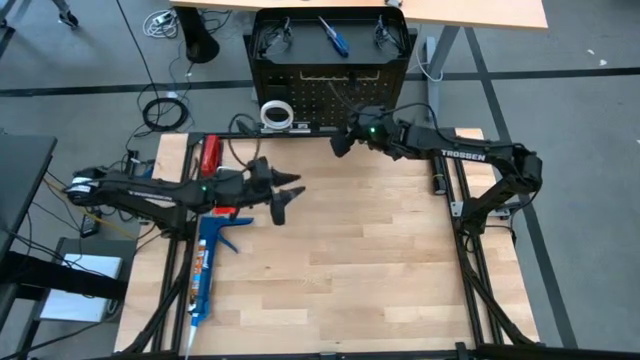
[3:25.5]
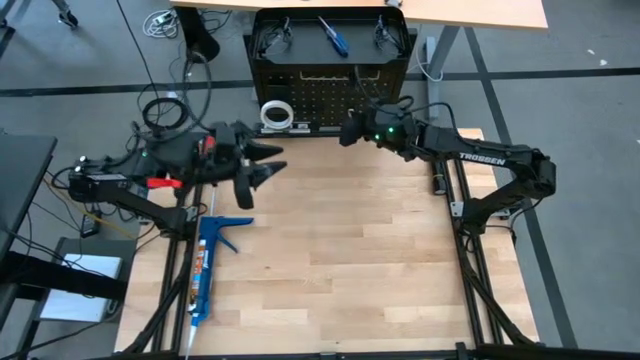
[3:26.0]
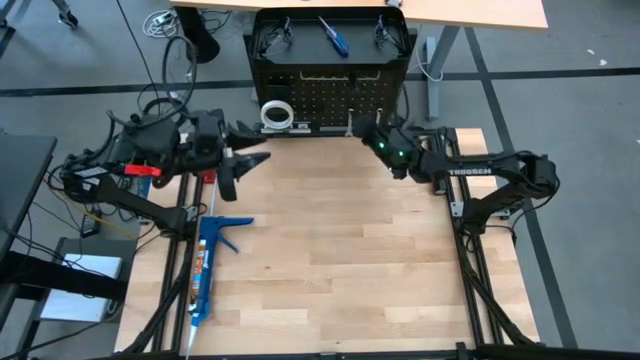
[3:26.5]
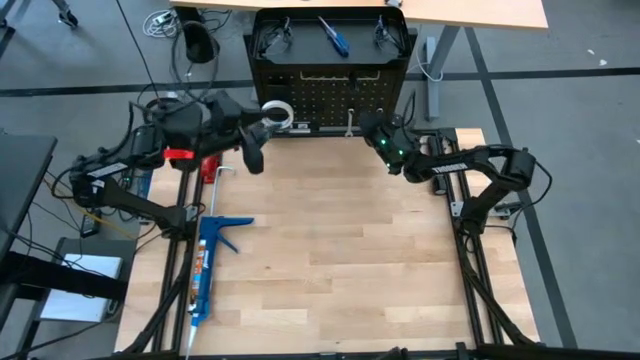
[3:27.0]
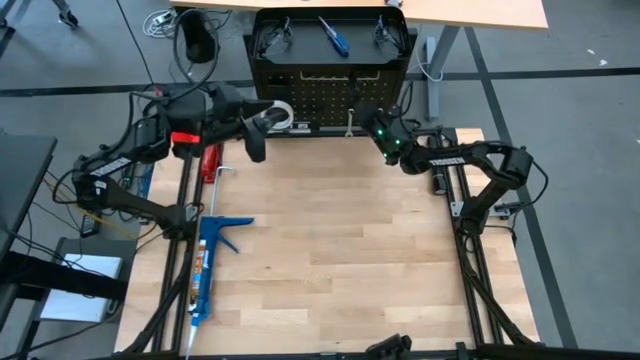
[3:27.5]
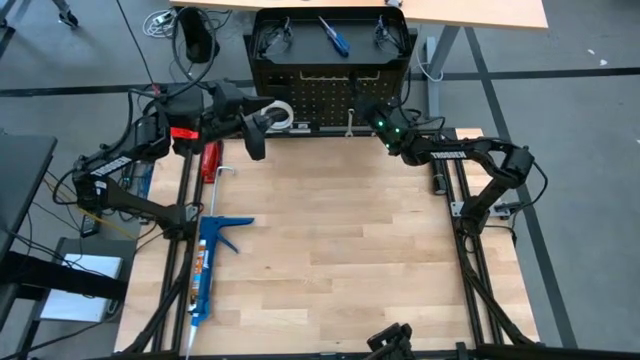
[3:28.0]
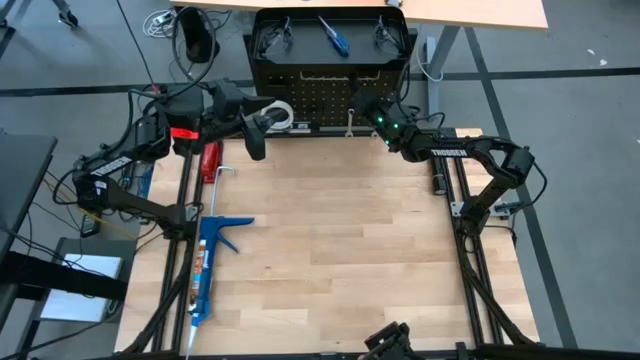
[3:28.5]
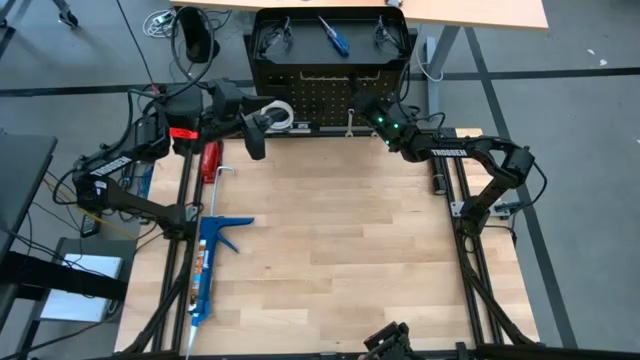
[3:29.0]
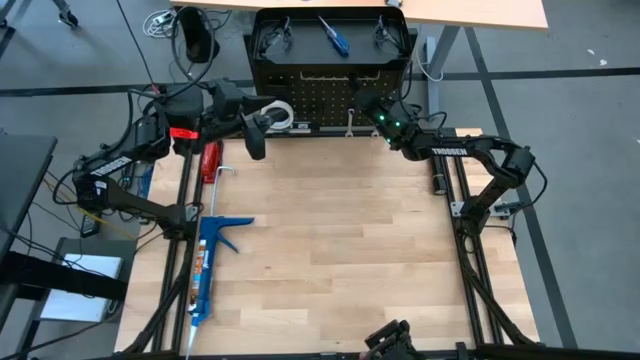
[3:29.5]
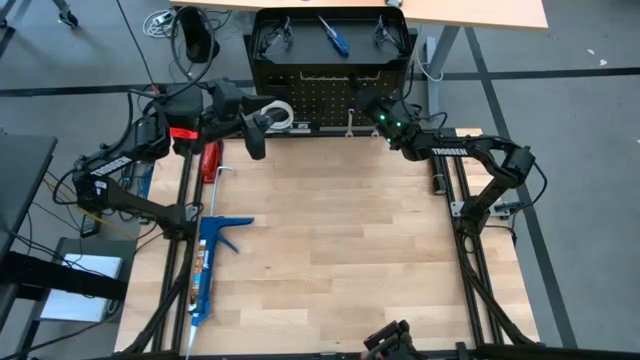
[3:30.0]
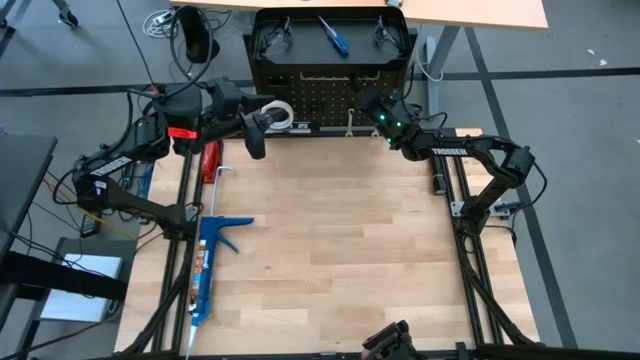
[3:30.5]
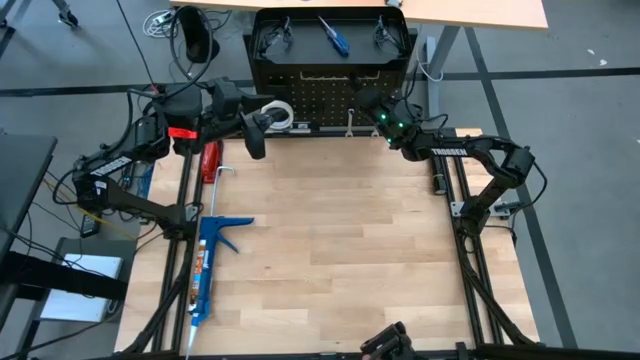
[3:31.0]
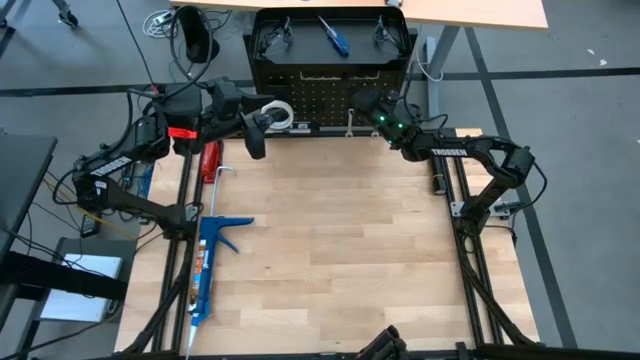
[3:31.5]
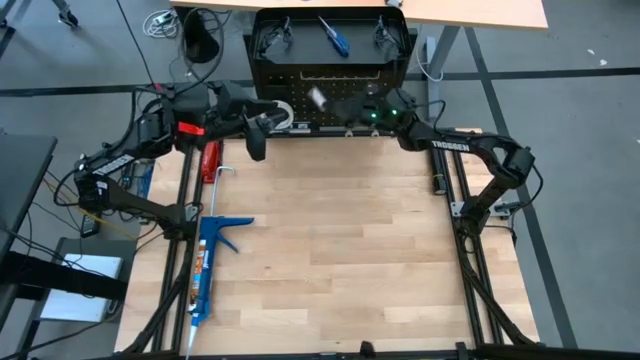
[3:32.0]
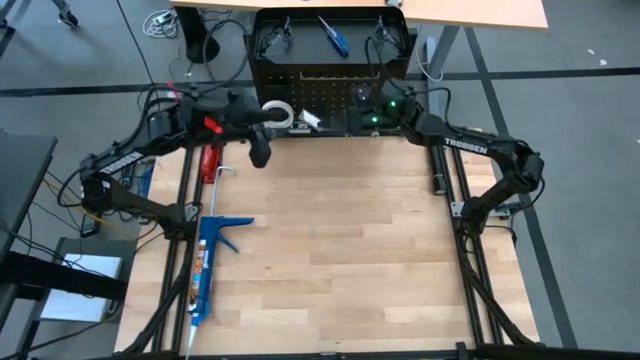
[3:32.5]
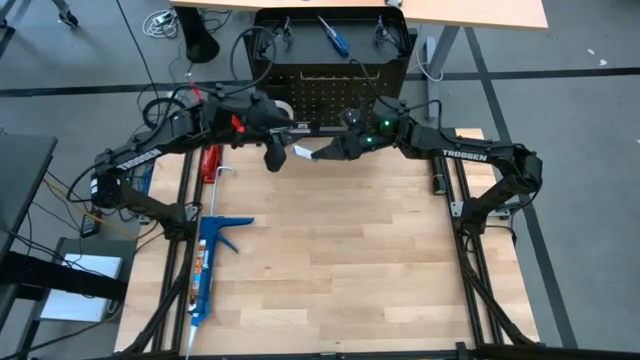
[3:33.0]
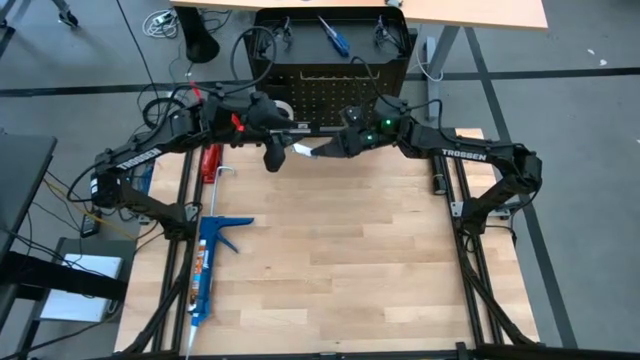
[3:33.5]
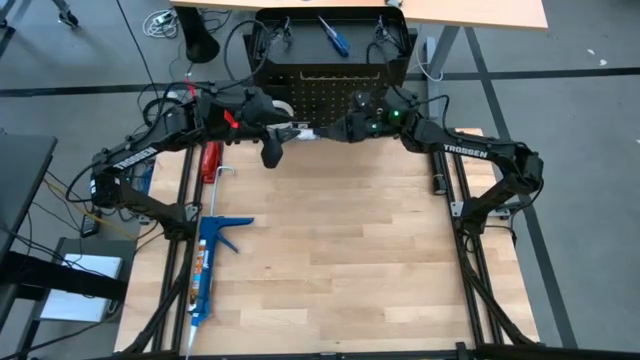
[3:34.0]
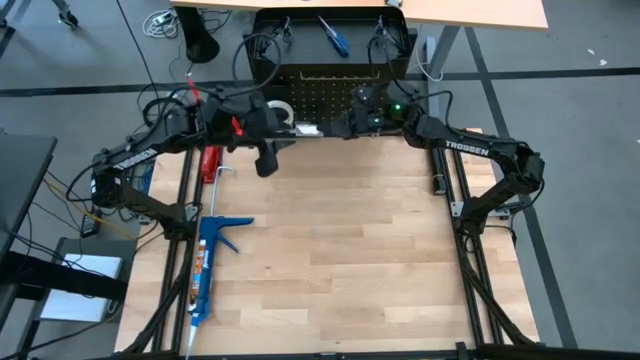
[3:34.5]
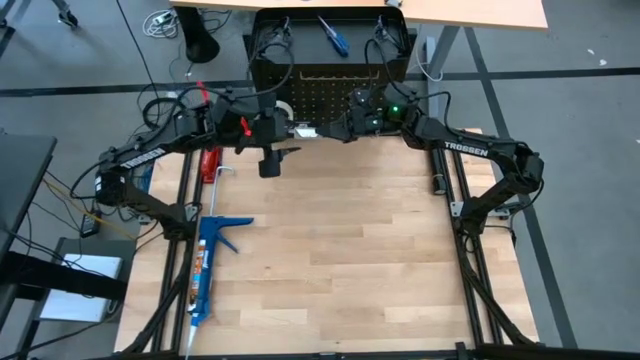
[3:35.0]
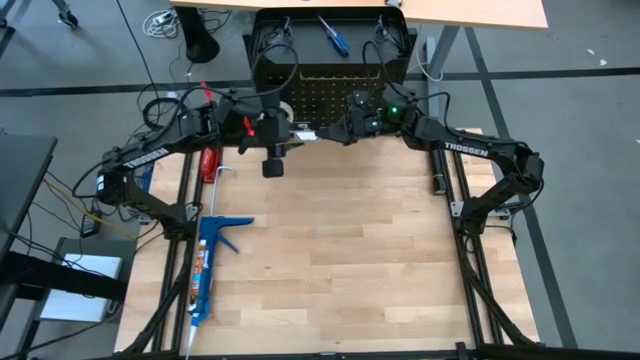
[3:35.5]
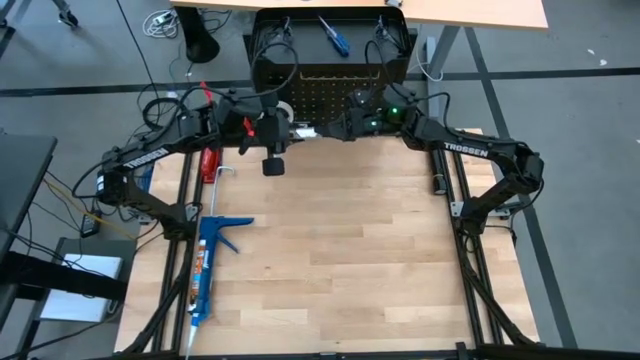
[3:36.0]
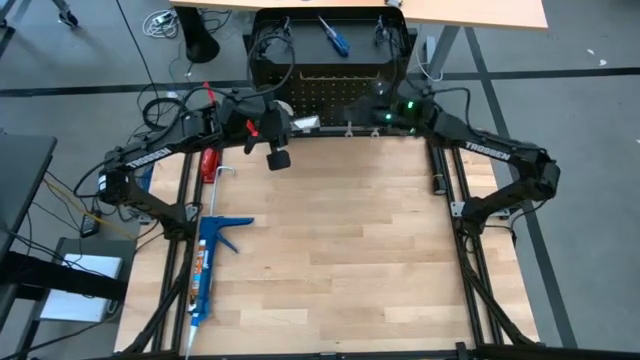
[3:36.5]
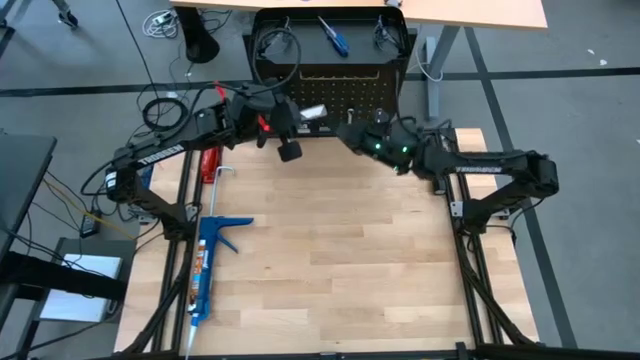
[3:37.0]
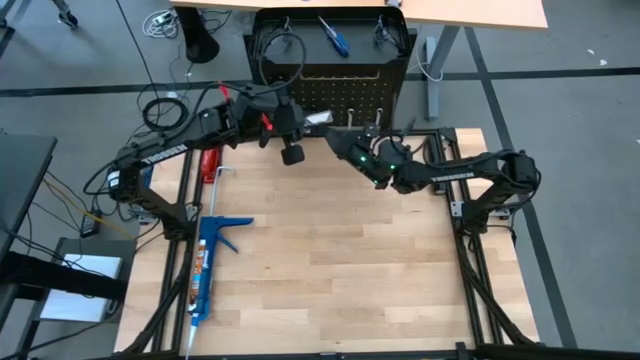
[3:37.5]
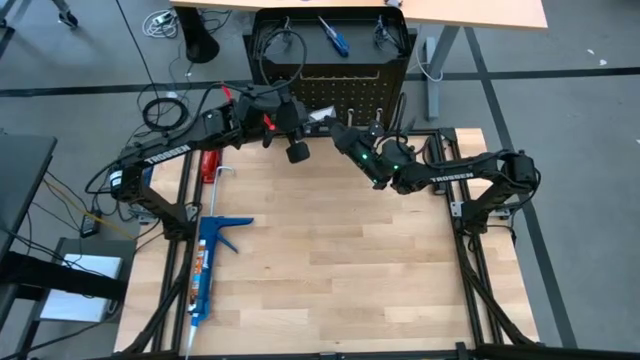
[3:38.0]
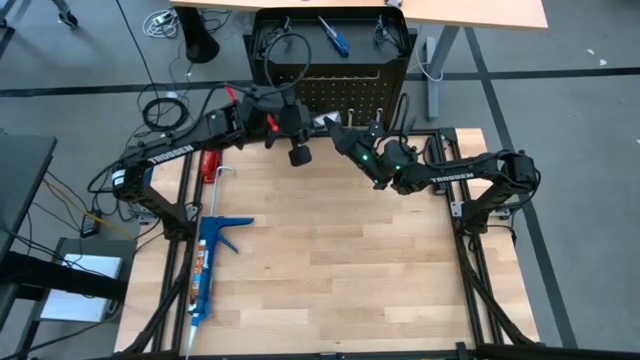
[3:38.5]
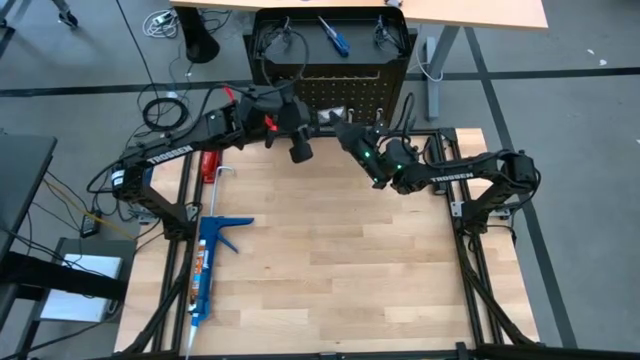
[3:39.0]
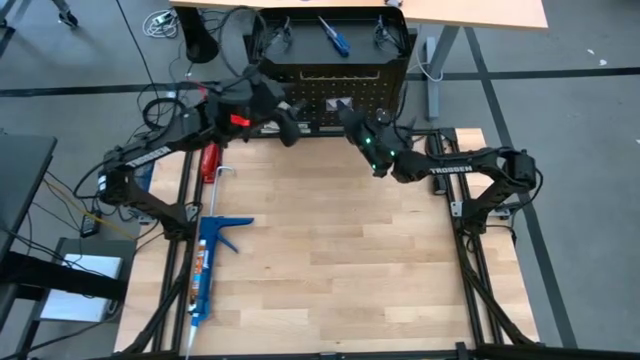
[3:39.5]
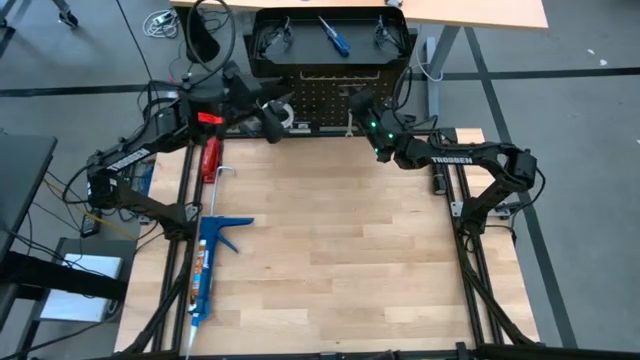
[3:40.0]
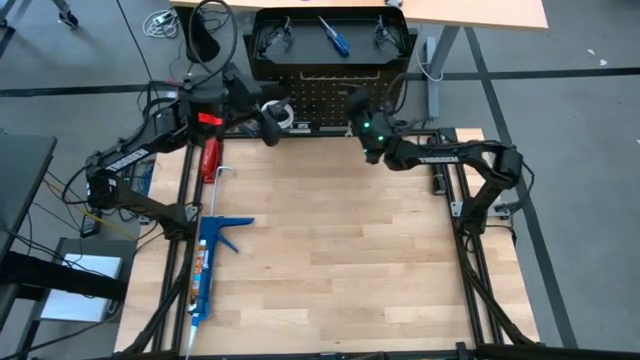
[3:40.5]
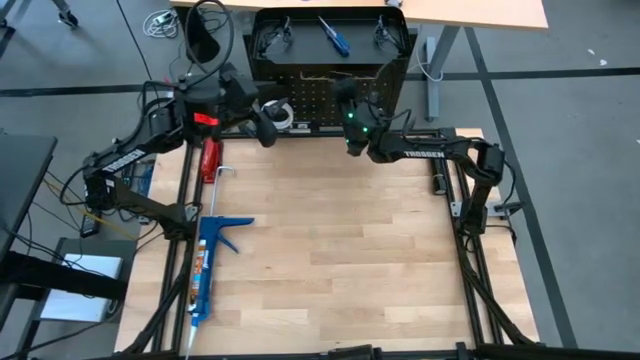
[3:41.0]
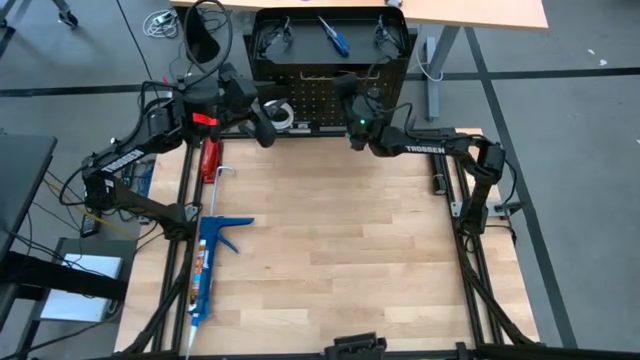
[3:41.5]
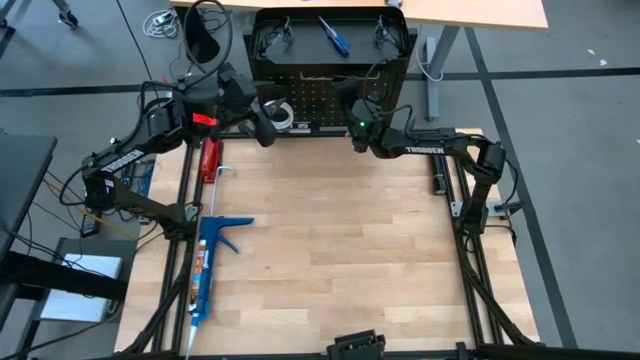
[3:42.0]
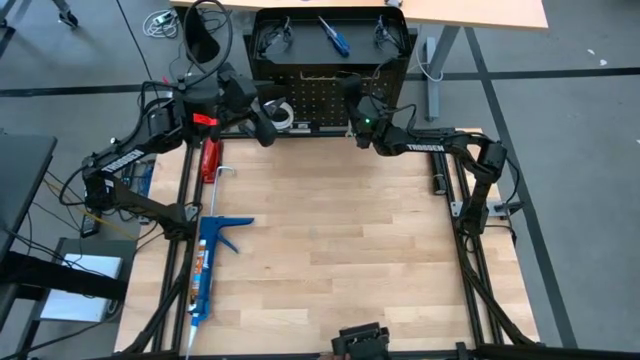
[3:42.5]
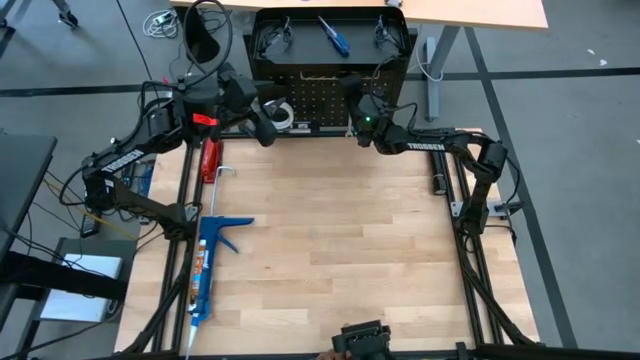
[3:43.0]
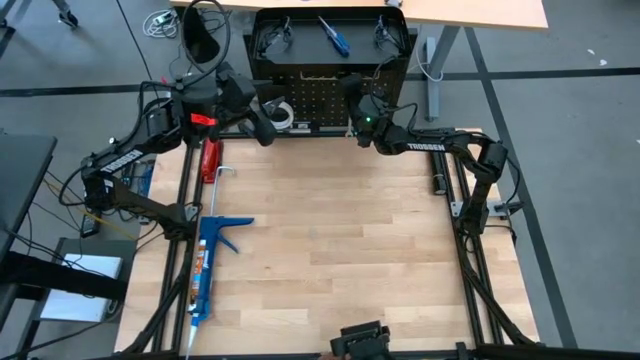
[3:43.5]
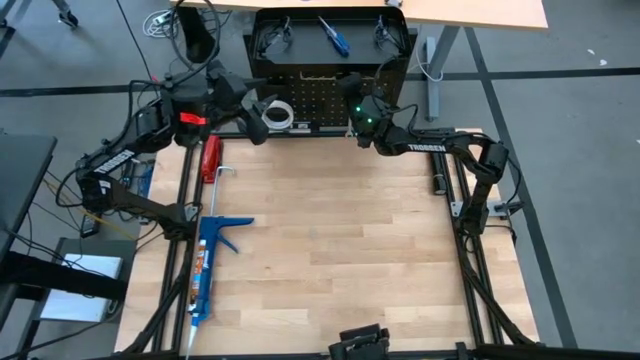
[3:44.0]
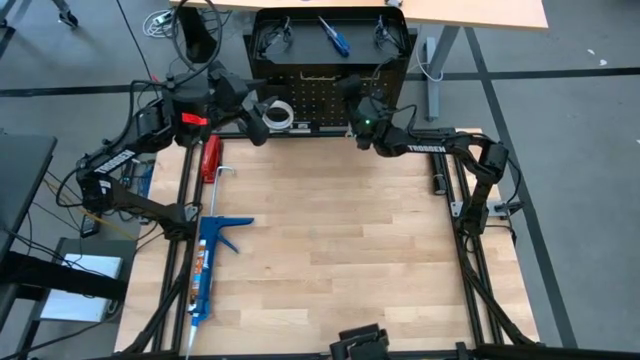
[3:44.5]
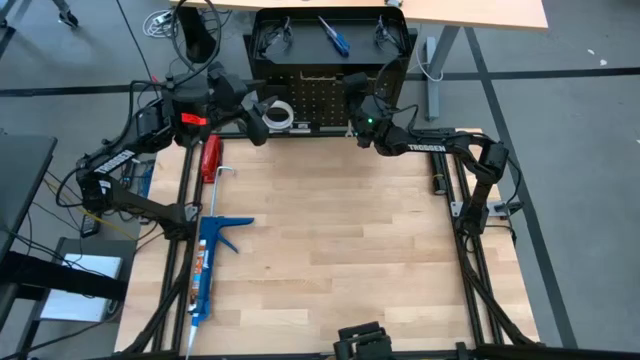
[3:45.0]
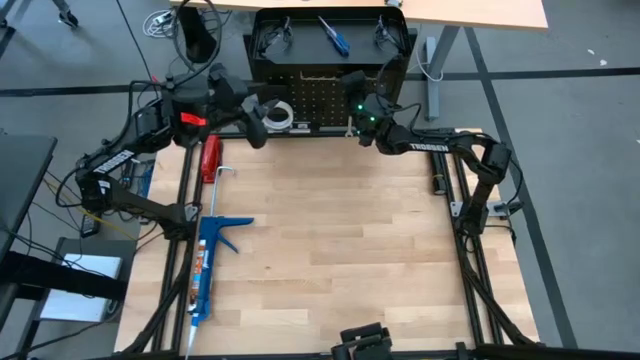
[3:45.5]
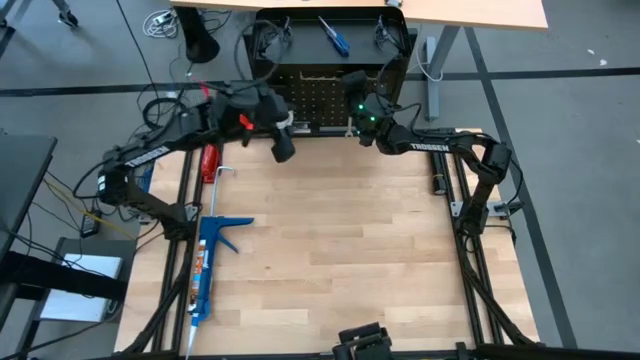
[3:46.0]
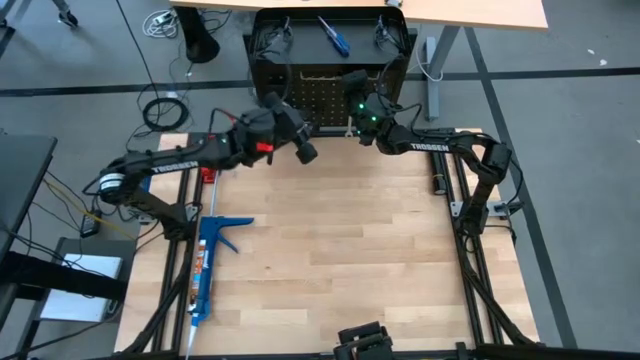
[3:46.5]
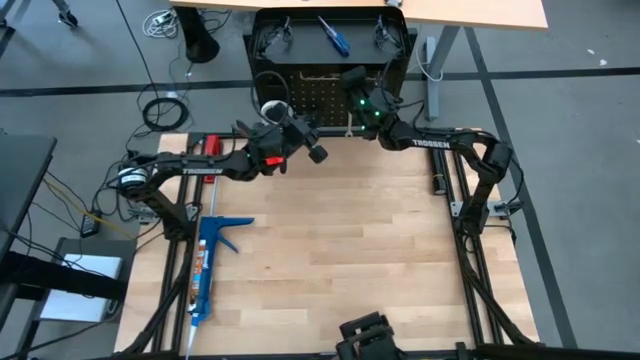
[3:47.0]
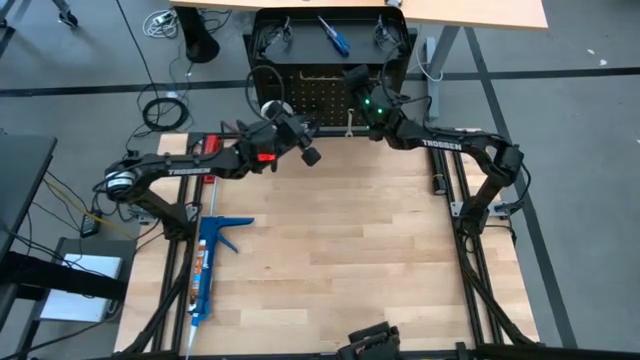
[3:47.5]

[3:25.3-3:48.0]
Task: Hang tools onto peg board
Put the black utility knife blade dispenser onto the black pegboard
